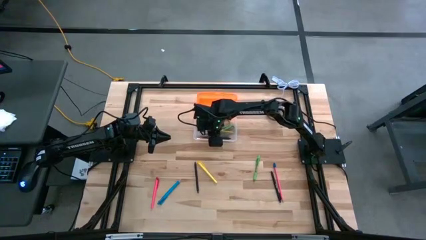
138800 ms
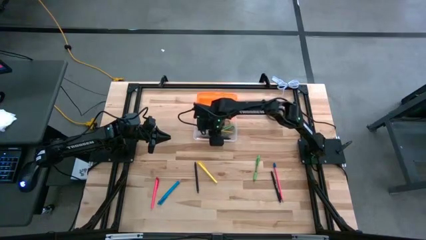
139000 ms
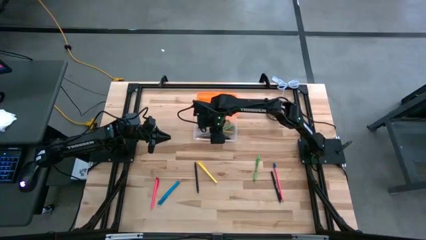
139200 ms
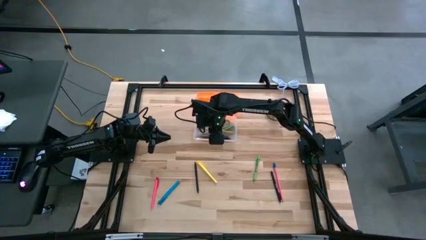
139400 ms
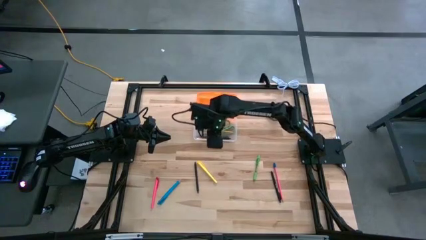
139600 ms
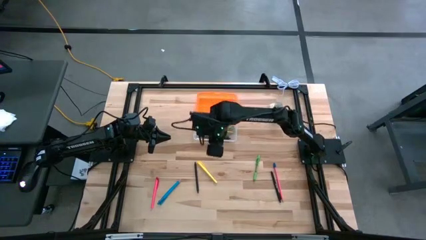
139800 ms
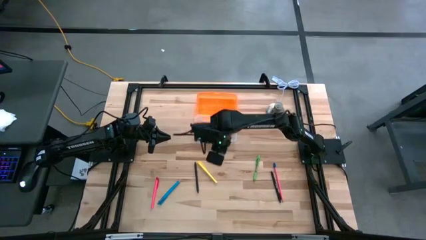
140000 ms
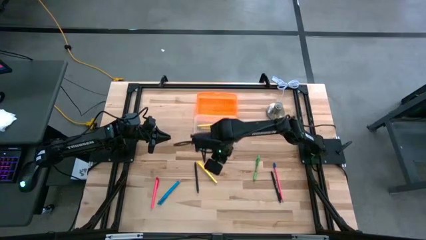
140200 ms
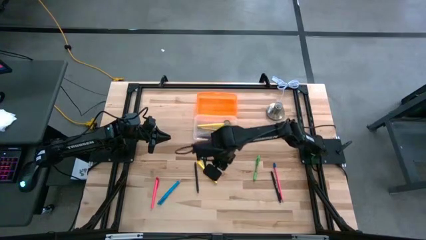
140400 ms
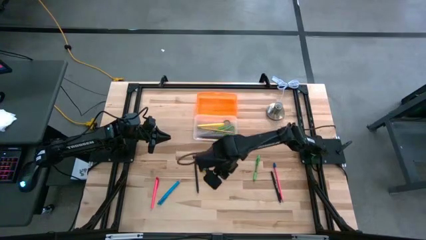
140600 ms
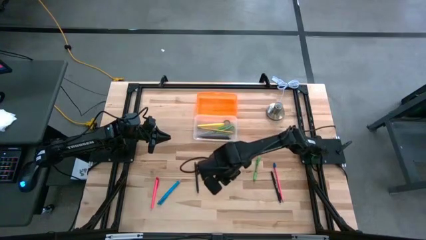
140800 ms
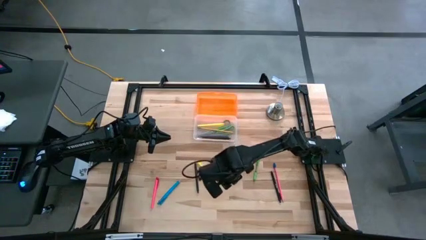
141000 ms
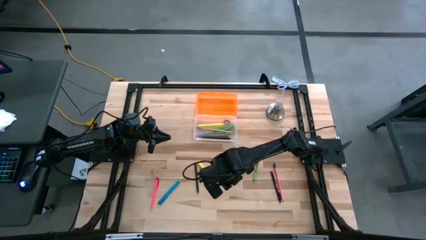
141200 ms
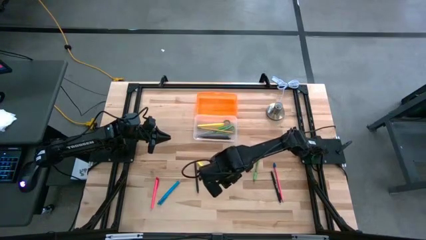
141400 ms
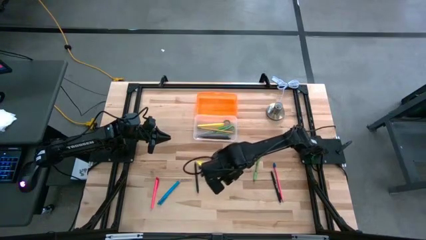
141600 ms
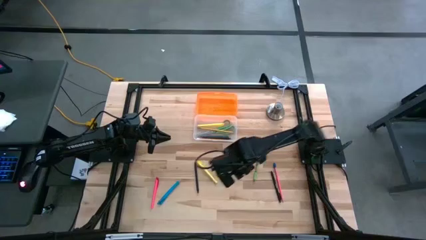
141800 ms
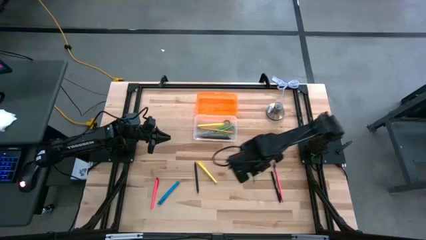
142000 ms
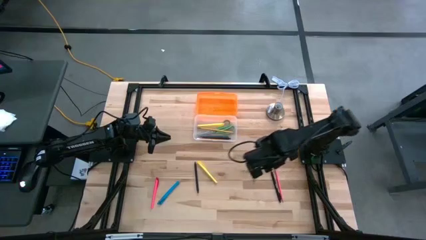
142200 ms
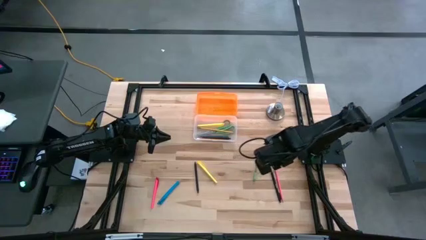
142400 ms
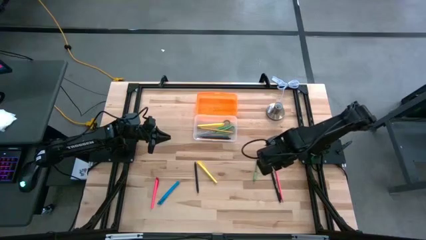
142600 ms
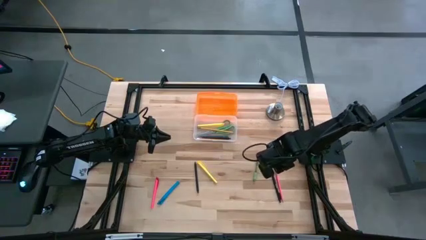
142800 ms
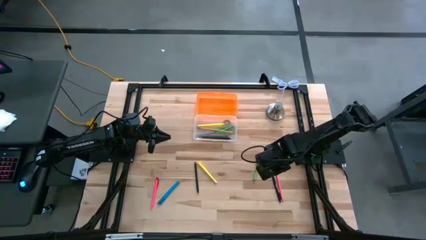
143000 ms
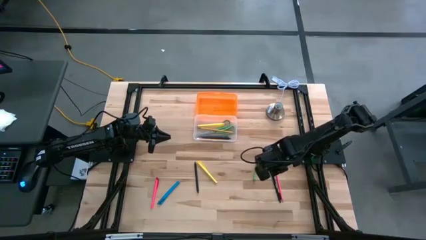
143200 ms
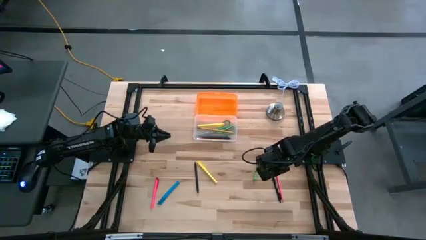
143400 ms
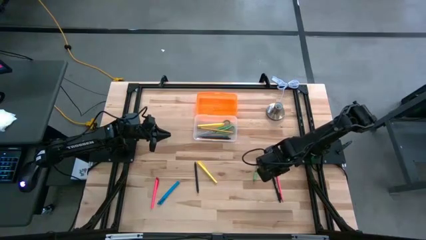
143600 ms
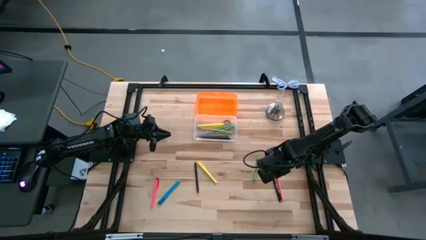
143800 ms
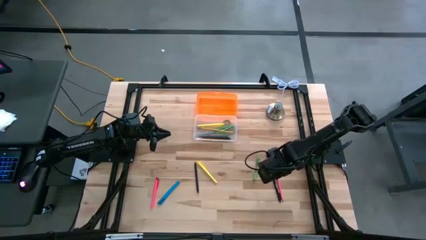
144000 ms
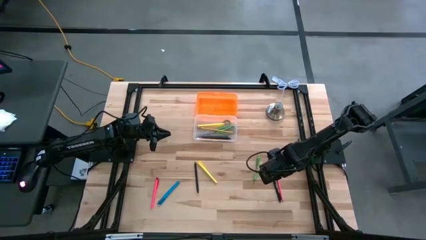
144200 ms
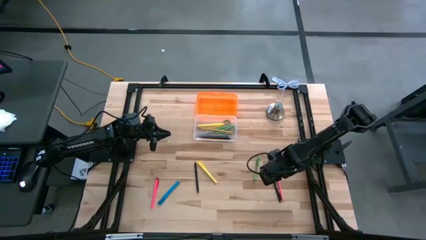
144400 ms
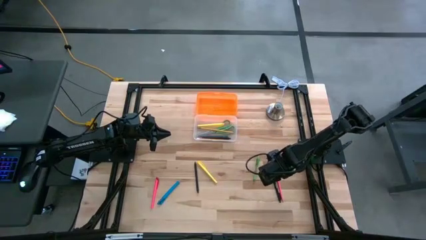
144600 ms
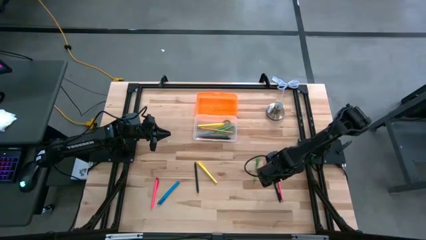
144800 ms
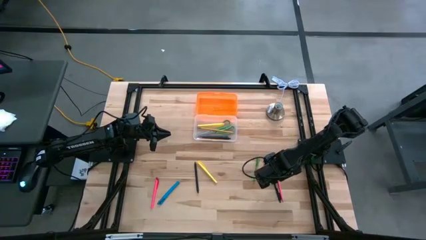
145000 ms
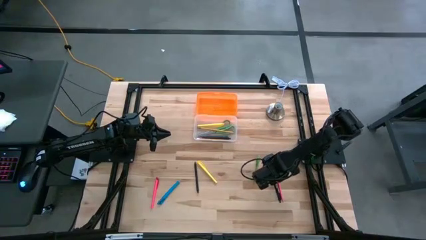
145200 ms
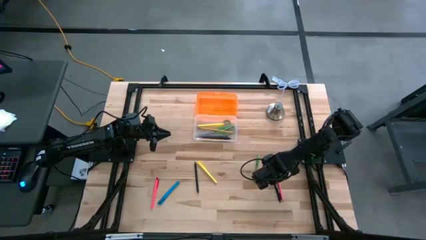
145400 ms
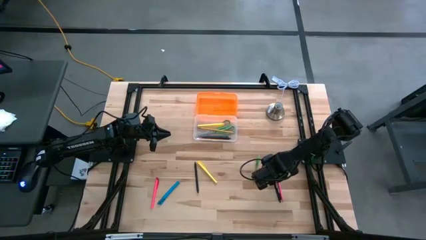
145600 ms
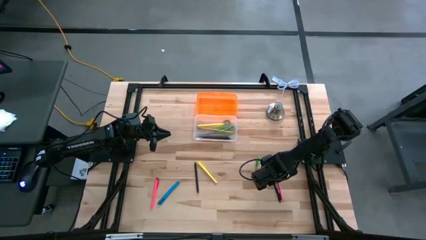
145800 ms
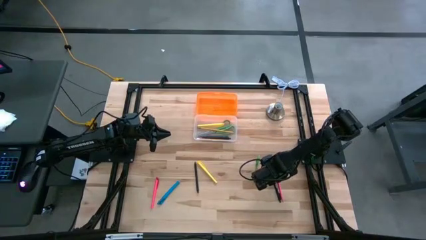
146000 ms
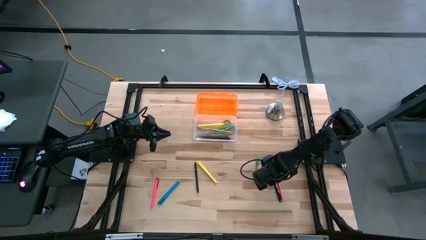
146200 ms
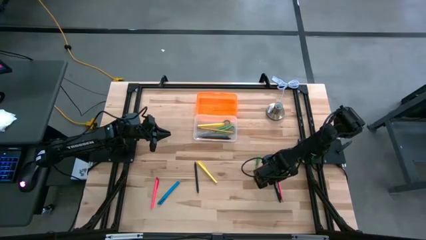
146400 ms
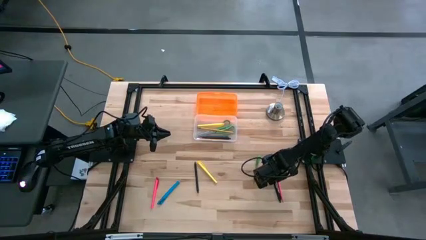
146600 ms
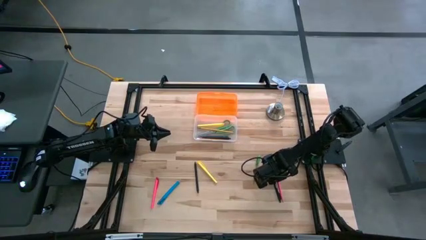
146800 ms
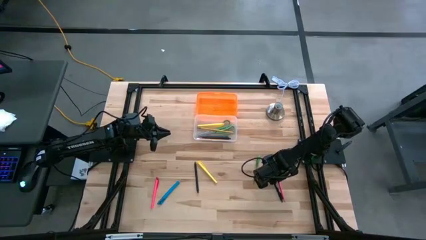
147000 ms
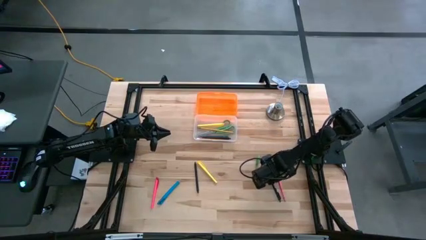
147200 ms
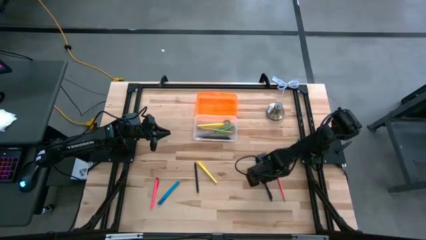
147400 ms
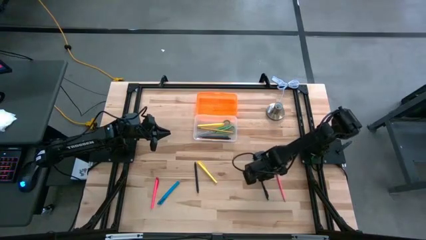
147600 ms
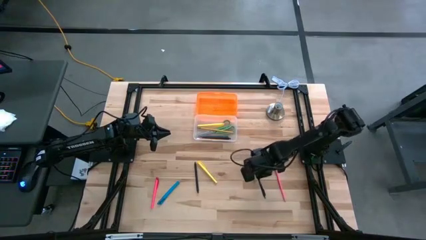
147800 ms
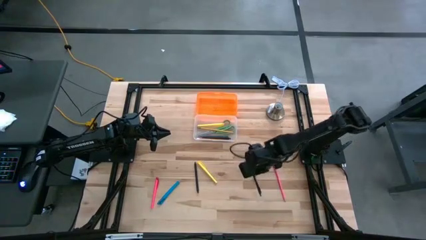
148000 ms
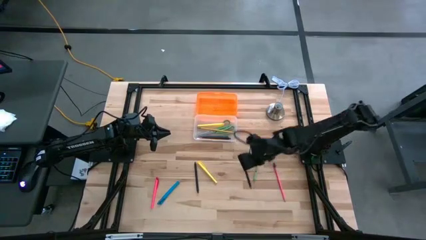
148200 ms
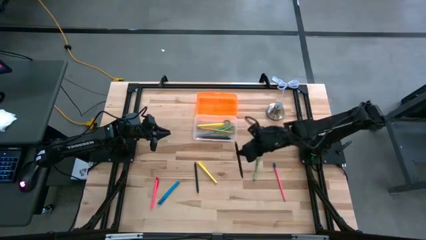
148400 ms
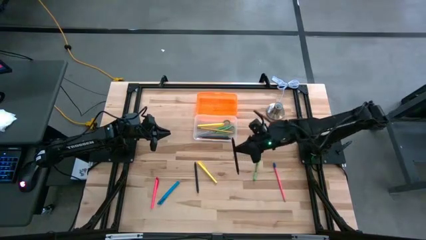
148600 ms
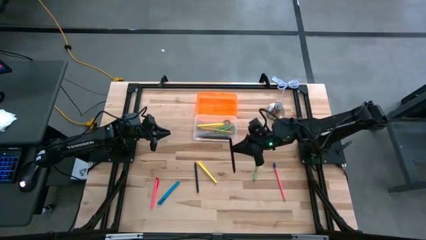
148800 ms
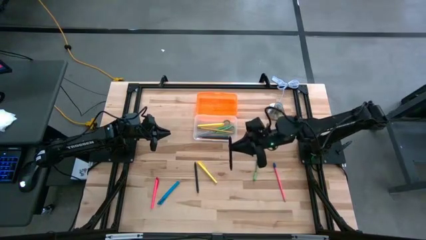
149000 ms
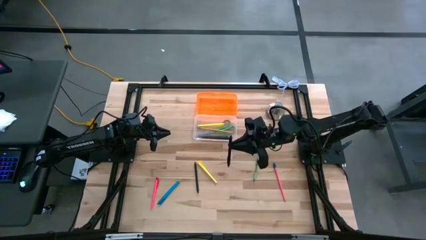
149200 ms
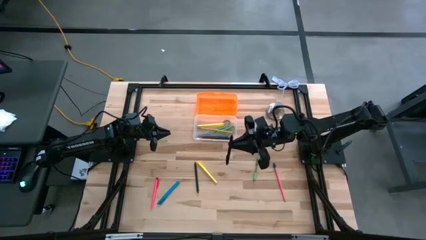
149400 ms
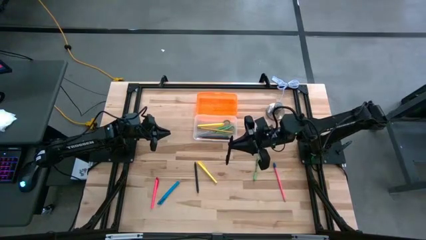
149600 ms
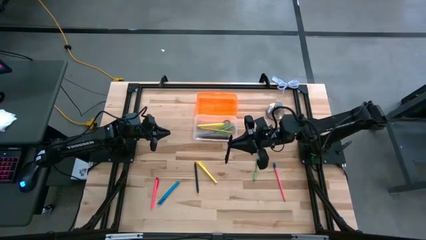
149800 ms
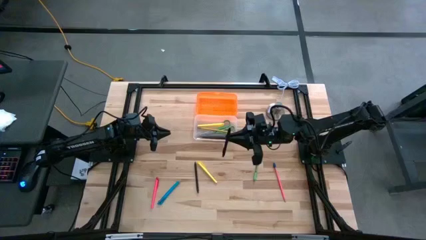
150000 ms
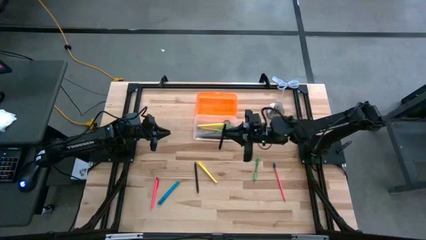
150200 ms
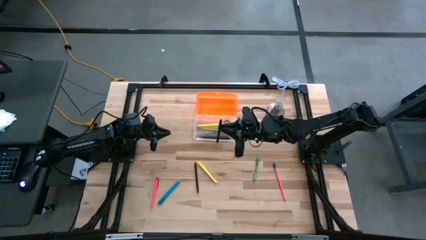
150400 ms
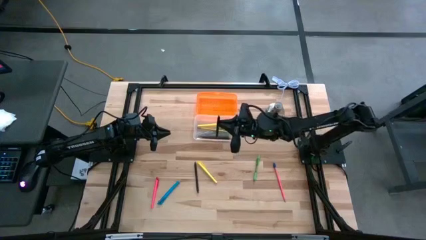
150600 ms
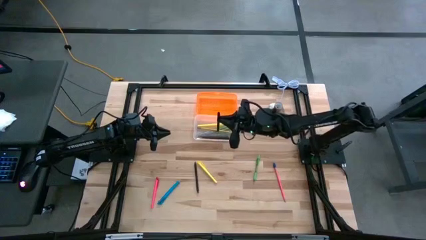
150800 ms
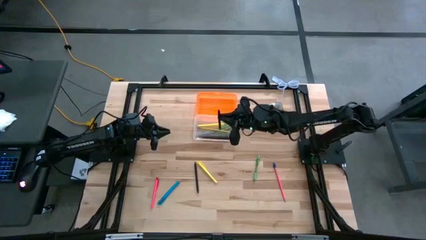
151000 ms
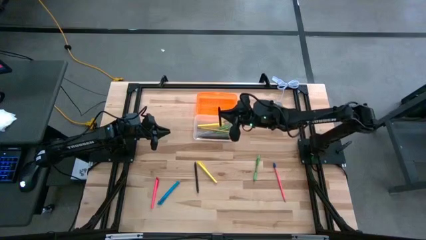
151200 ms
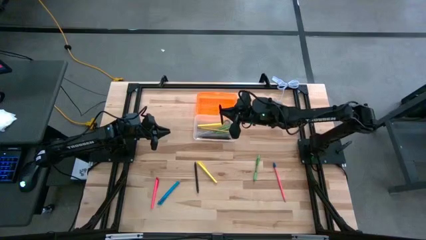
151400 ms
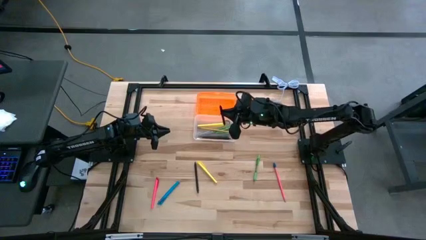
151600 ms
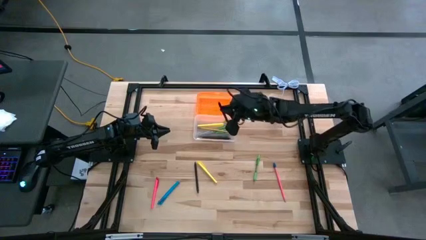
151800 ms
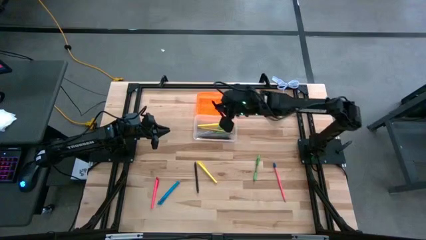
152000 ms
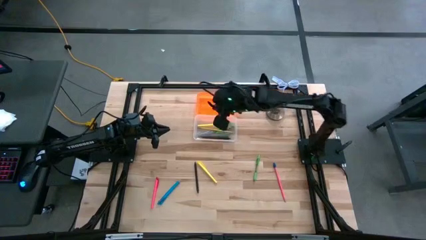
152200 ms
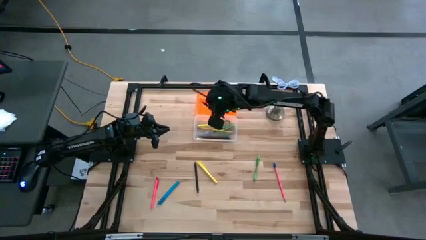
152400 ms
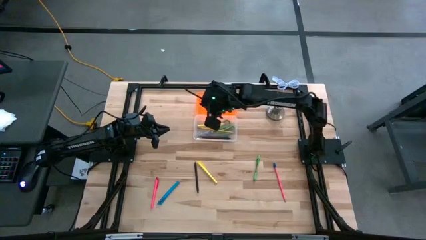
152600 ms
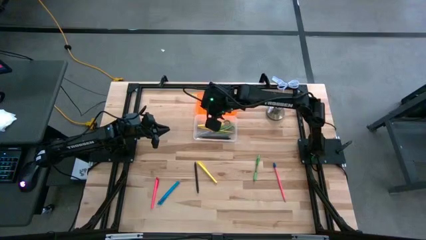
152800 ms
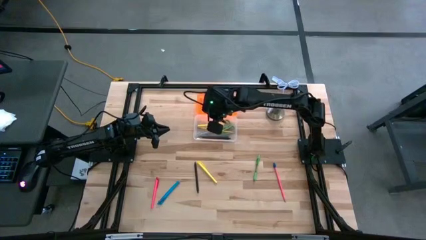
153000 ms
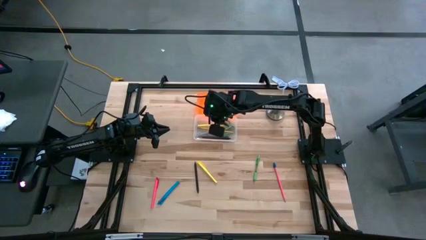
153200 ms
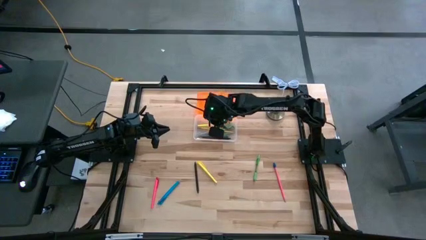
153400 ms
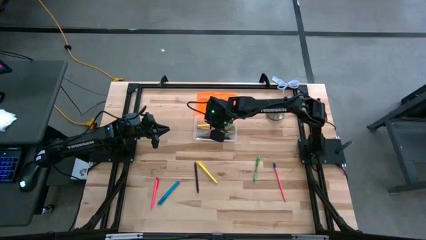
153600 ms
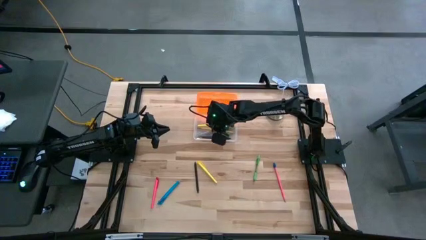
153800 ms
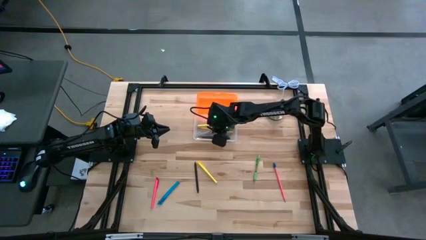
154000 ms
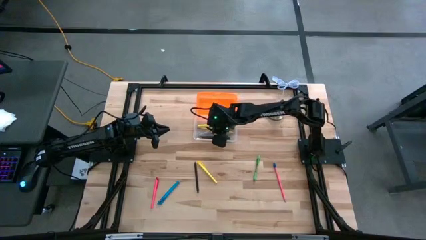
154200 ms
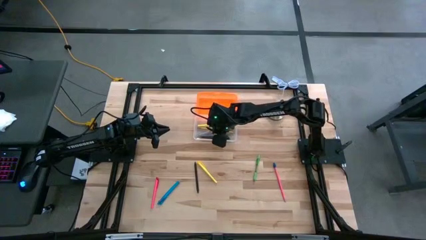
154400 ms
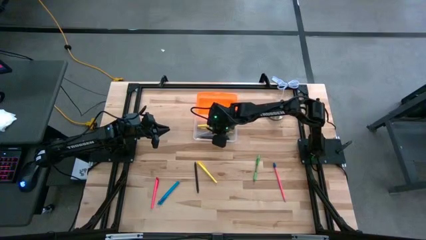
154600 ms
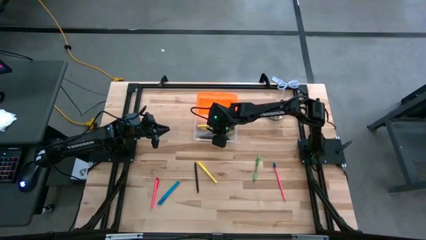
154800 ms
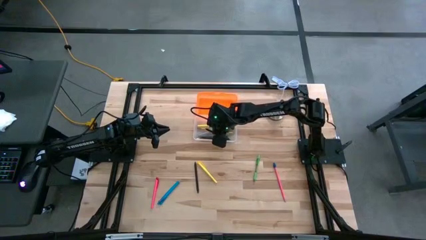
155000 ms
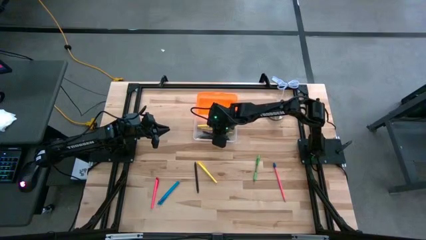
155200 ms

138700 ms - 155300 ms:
Task: Pick & place school supplies into a supply box
Put the right black pen into the orange supply box

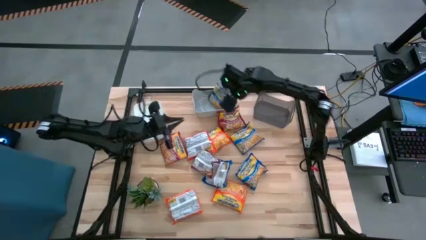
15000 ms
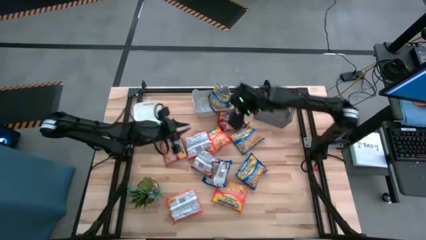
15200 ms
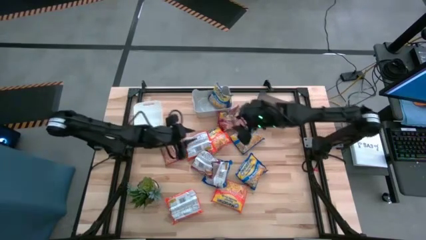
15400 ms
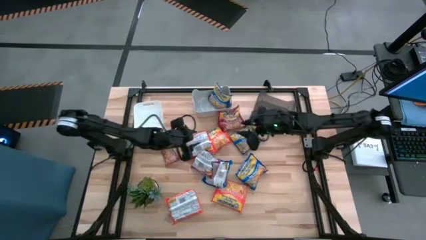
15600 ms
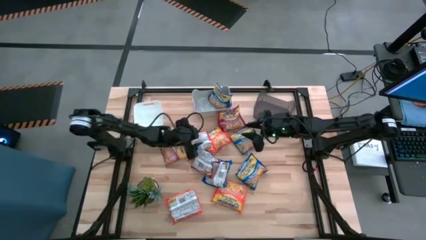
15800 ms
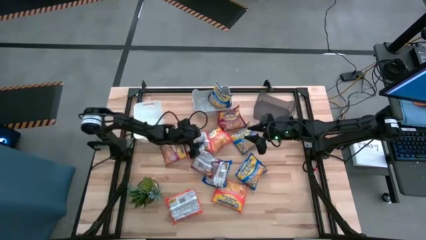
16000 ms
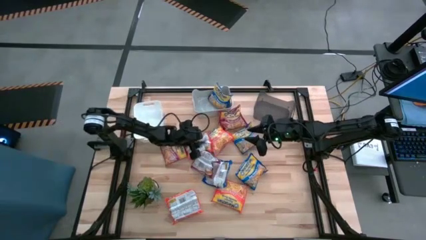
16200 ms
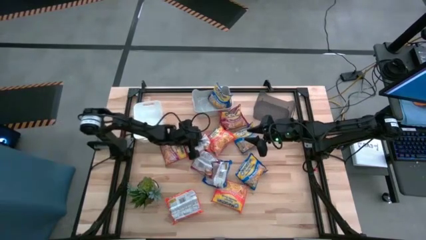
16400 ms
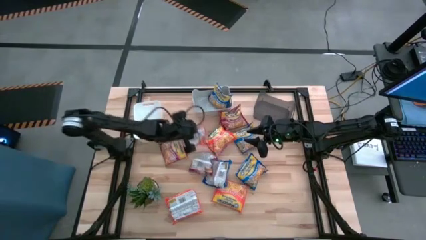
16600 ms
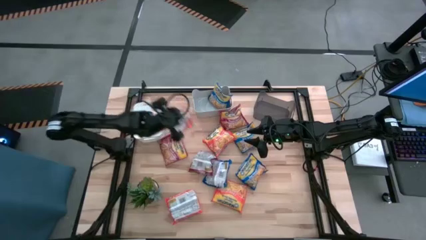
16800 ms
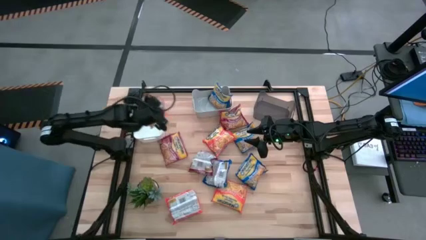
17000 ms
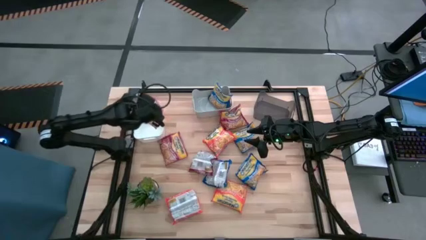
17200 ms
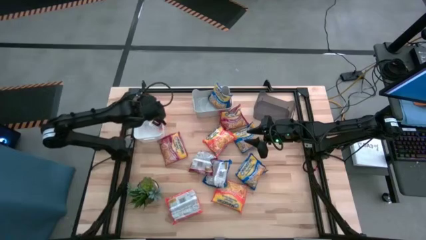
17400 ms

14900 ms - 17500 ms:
Task: Sort Maruchan noodles
Put the top left orange noodle into the white bin
